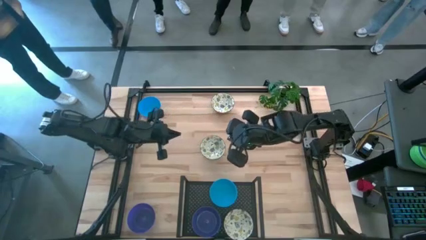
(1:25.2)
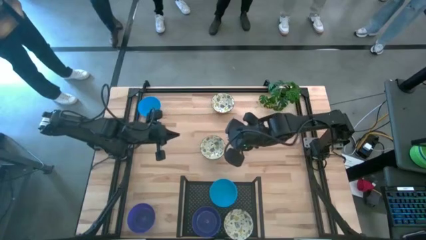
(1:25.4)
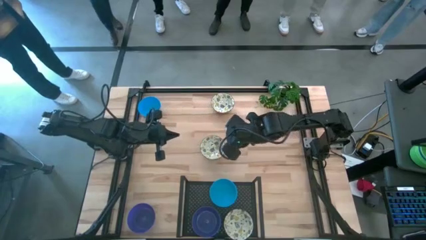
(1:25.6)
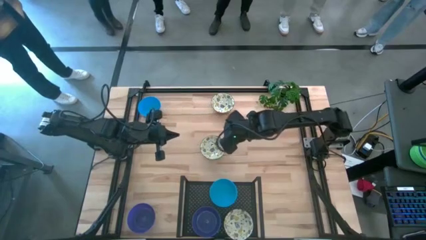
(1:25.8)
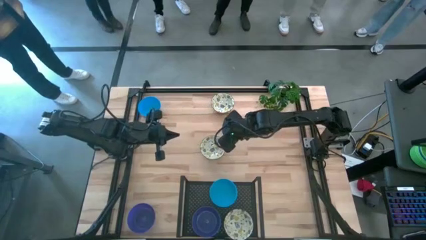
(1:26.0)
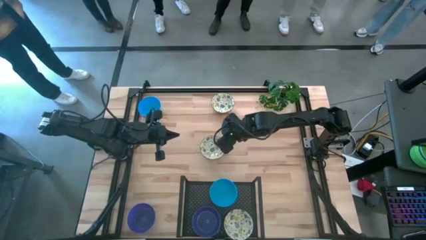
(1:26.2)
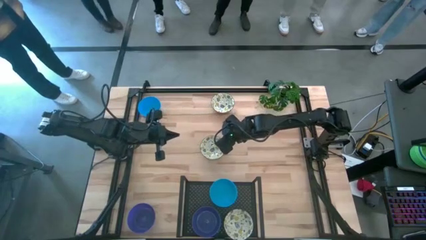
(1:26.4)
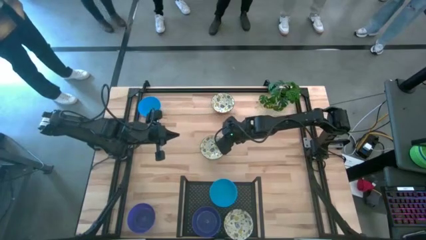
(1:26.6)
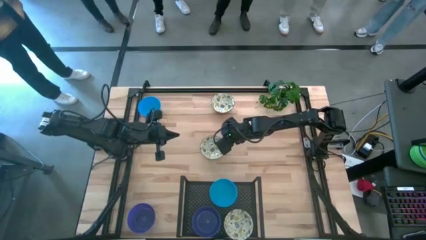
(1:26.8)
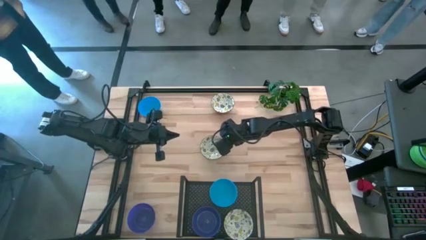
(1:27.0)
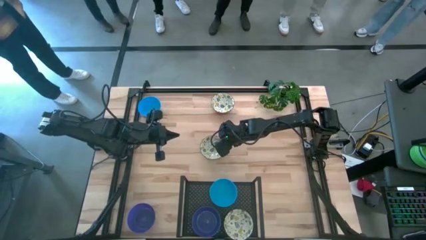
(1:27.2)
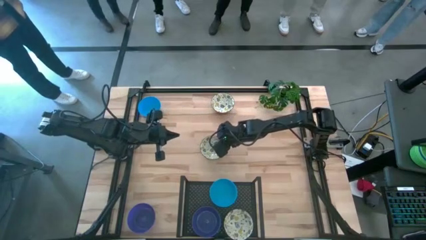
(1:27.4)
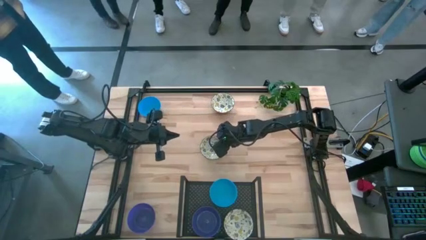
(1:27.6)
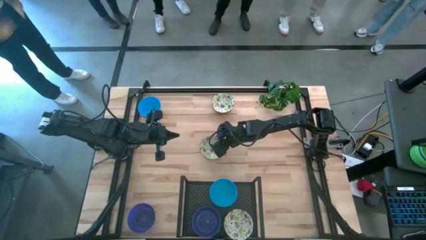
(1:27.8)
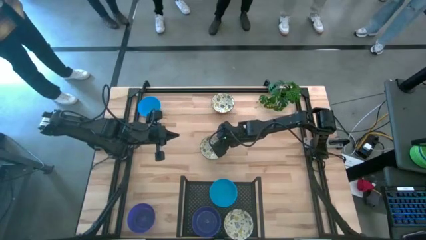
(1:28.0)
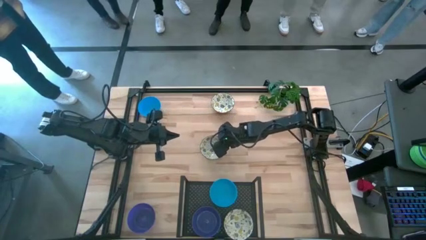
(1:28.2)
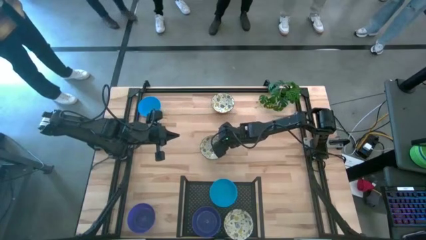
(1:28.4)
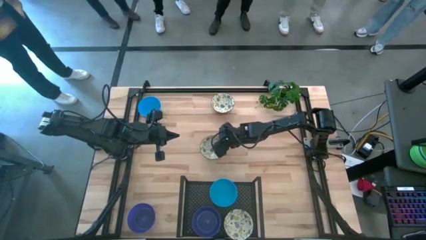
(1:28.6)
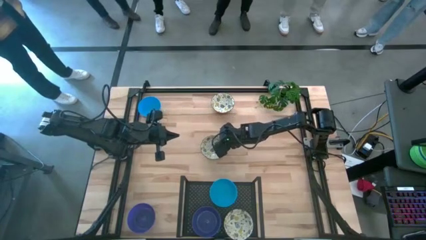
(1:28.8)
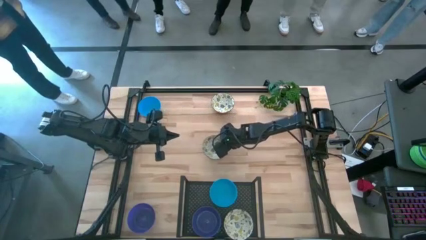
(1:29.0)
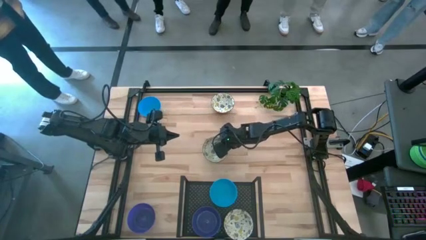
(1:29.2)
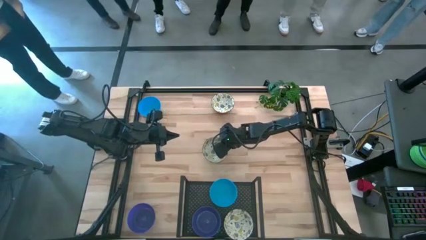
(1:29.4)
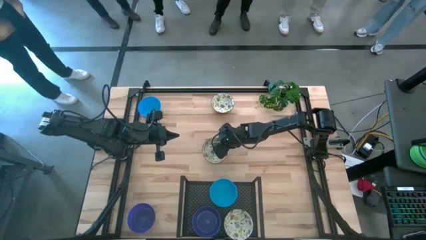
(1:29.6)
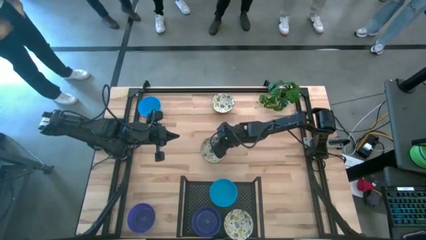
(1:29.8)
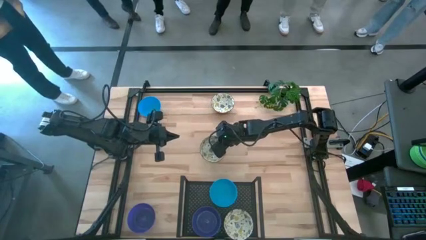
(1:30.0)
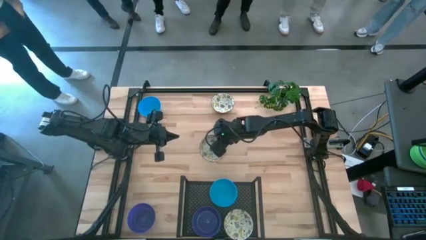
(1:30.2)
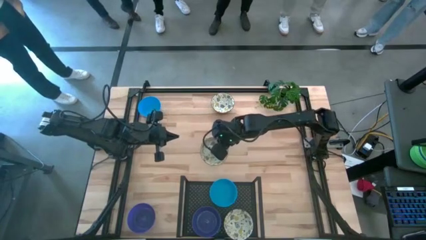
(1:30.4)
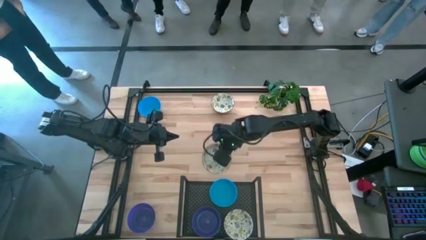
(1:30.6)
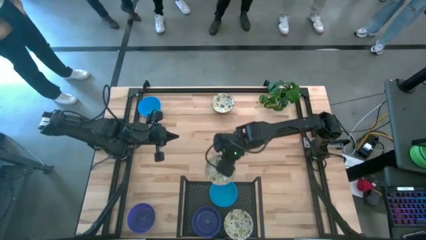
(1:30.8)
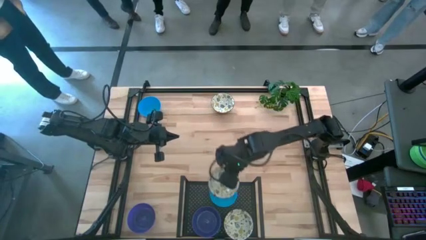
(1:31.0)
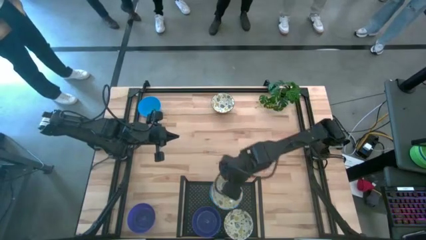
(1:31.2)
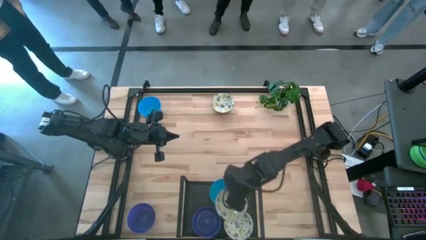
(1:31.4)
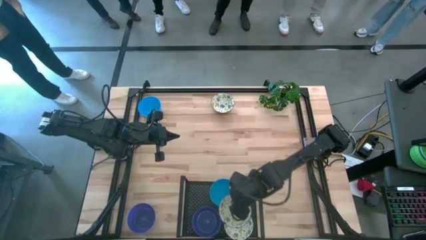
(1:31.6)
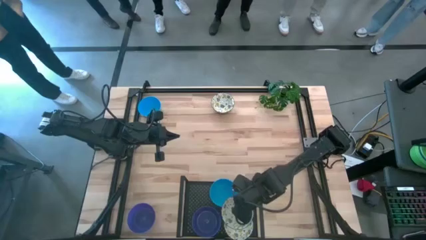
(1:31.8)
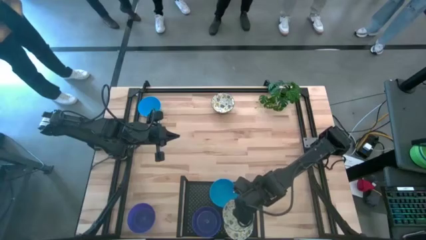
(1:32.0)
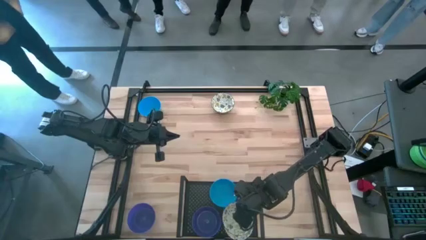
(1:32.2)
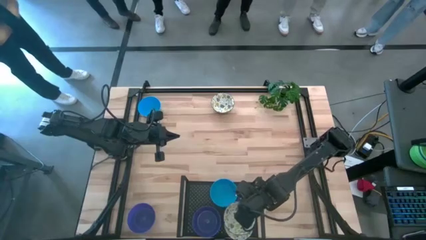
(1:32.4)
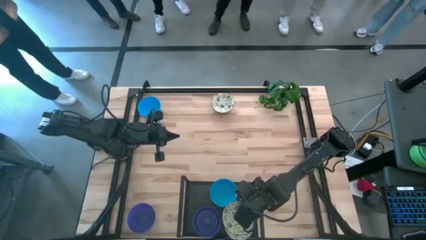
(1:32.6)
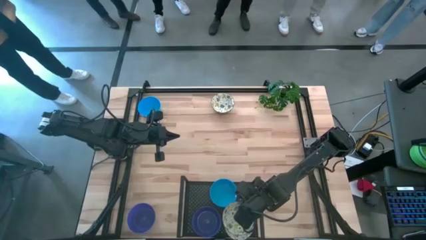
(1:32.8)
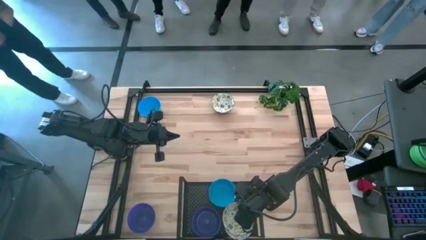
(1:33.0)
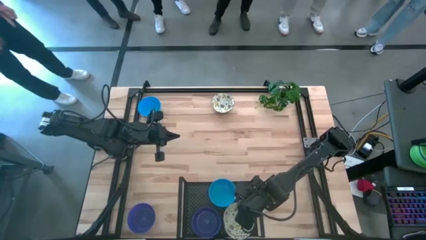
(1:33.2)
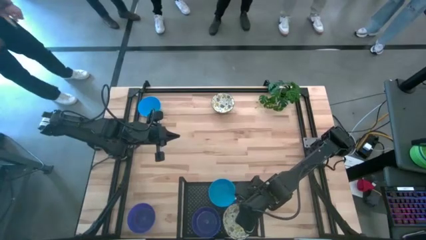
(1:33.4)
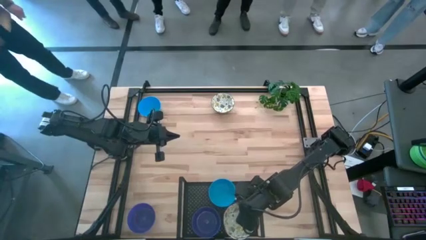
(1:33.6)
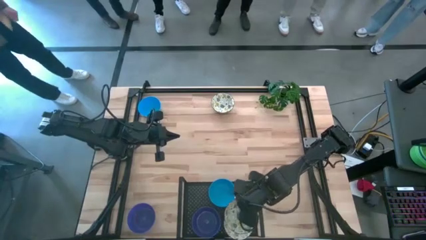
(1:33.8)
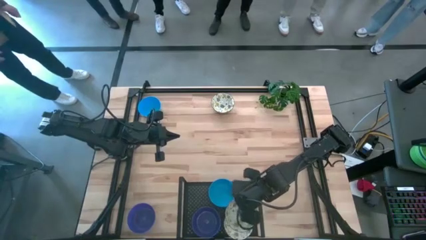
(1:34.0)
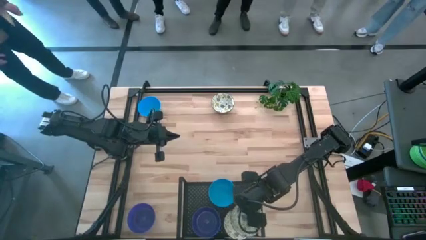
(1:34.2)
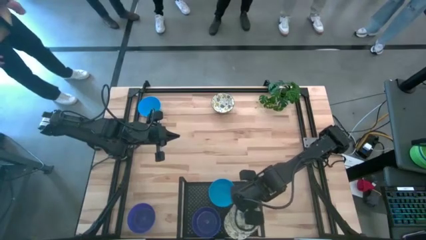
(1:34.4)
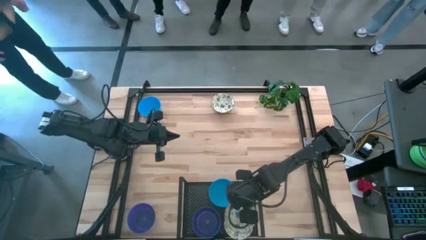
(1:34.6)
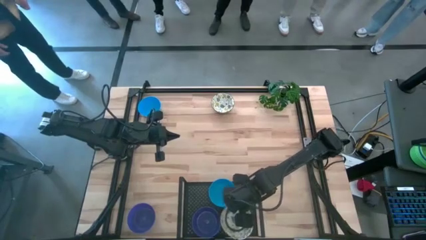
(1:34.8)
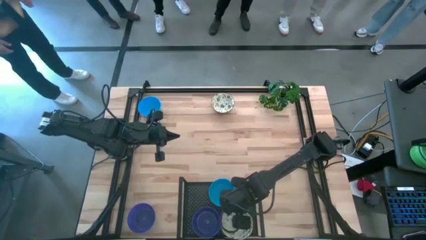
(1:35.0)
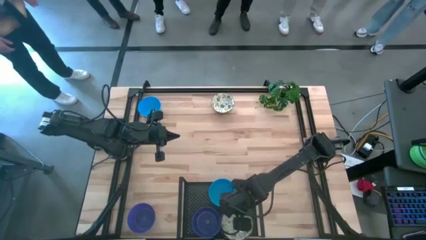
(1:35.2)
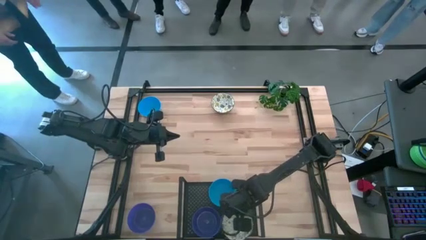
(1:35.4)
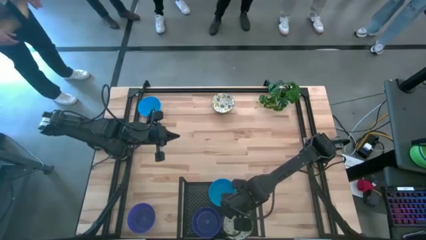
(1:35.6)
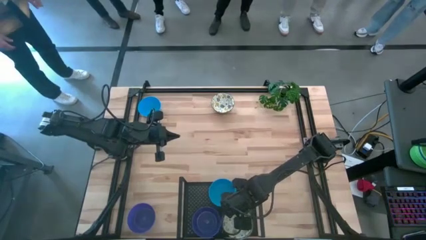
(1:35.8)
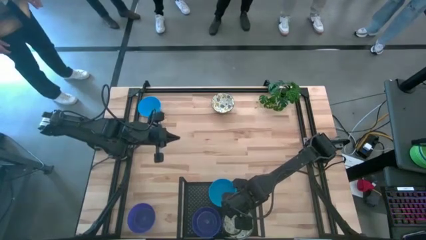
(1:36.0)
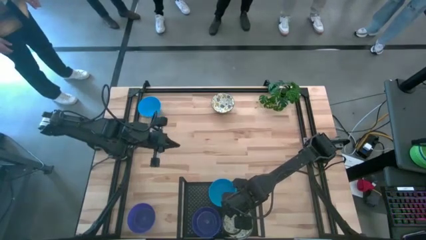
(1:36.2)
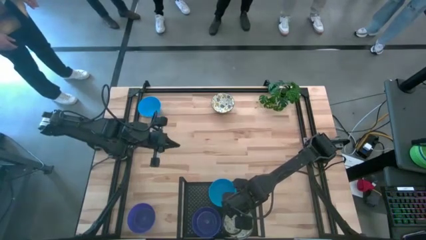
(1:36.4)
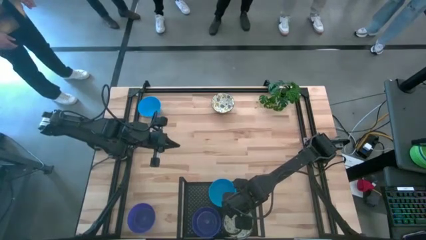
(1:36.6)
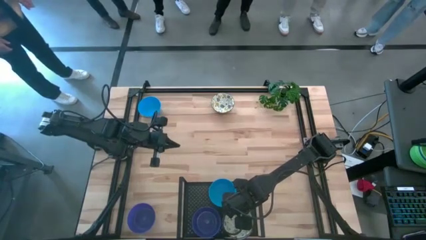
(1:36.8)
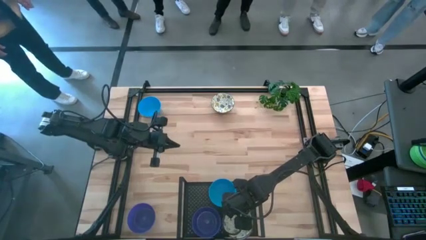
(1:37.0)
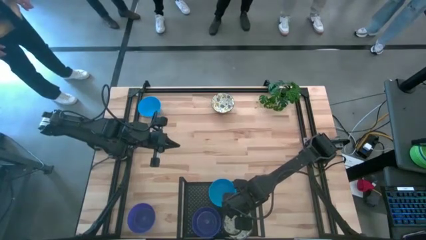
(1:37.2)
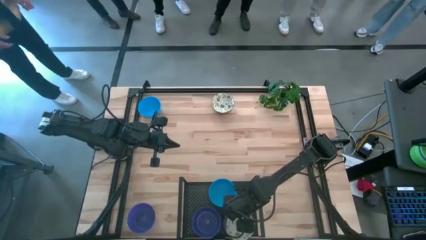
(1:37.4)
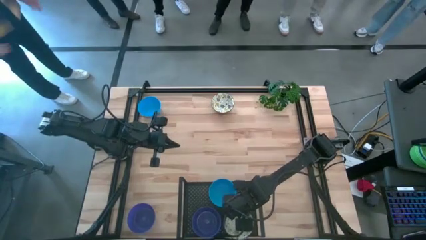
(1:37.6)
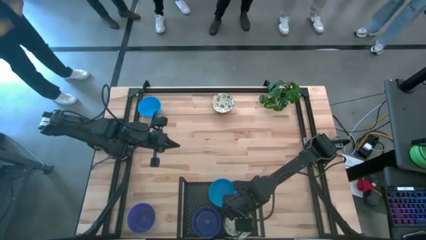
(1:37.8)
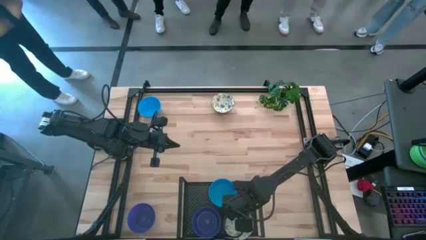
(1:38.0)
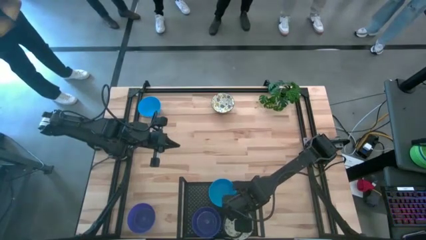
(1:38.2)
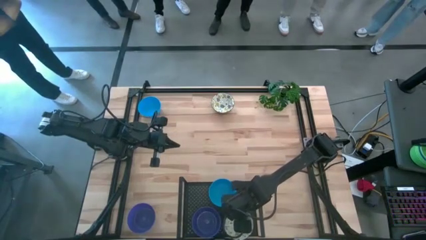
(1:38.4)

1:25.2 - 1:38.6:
Task: Pick & Place Mini bowls
Stack the bottom white patterned bowl on top of the white patterned bowl on the shelf
